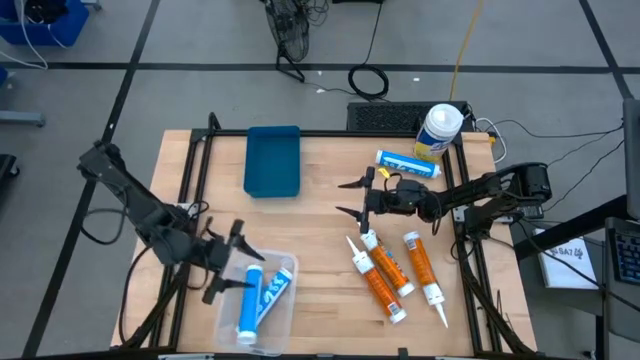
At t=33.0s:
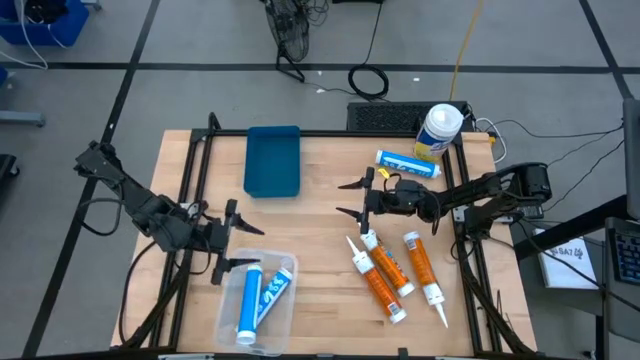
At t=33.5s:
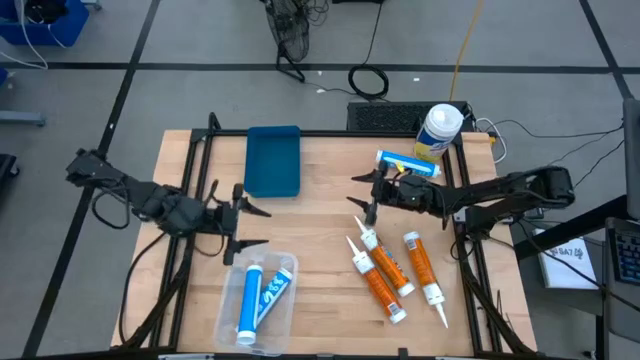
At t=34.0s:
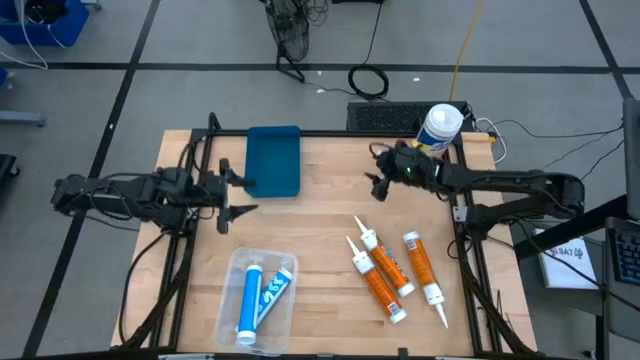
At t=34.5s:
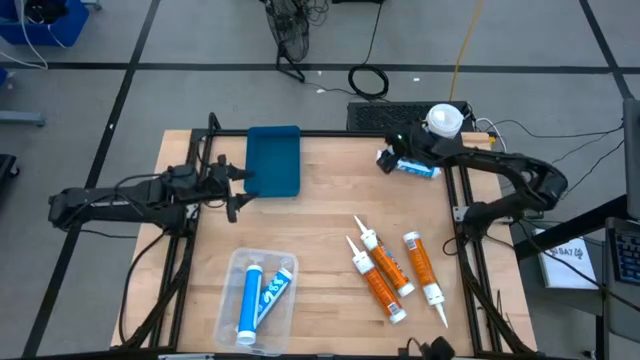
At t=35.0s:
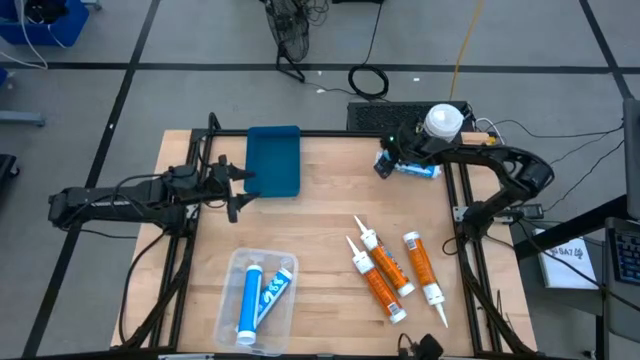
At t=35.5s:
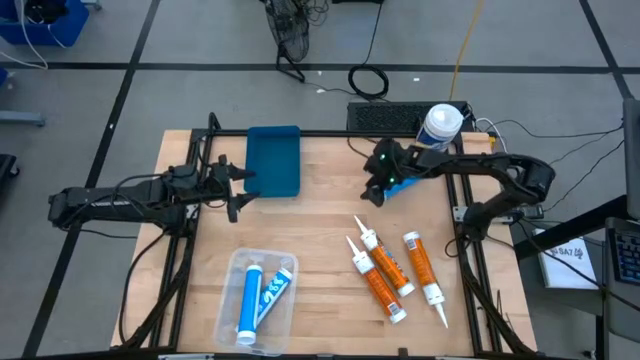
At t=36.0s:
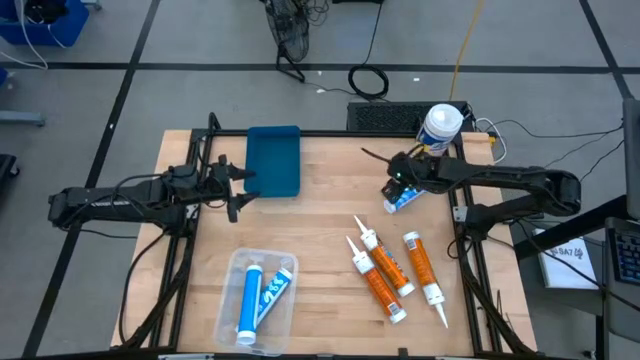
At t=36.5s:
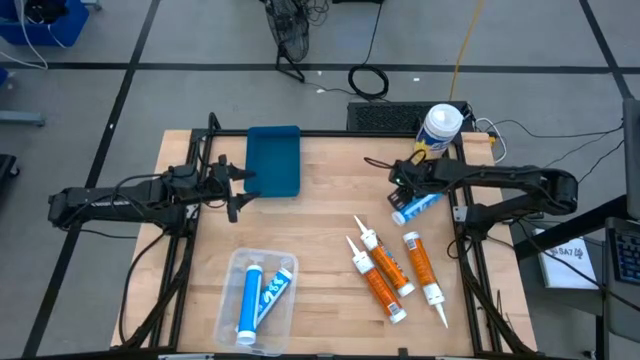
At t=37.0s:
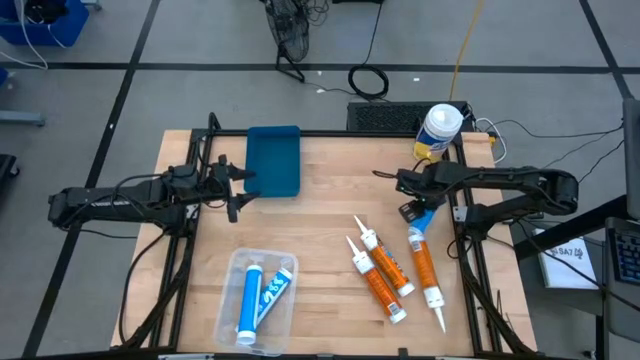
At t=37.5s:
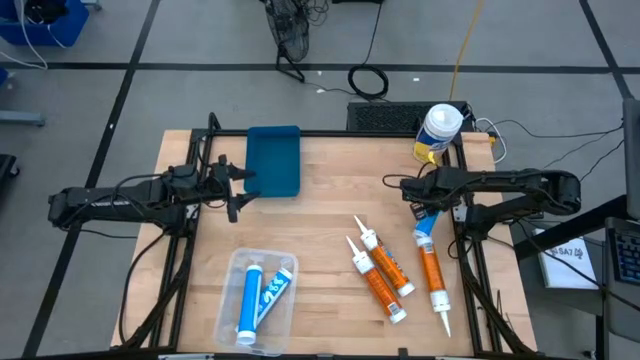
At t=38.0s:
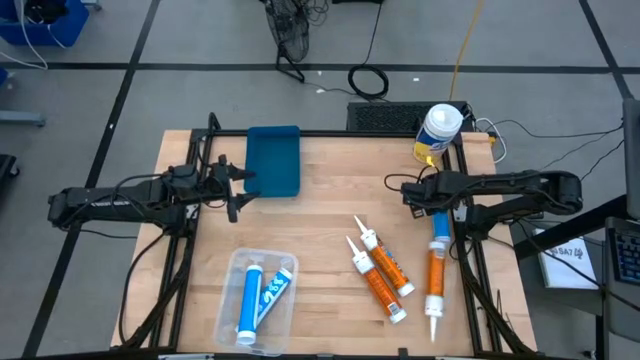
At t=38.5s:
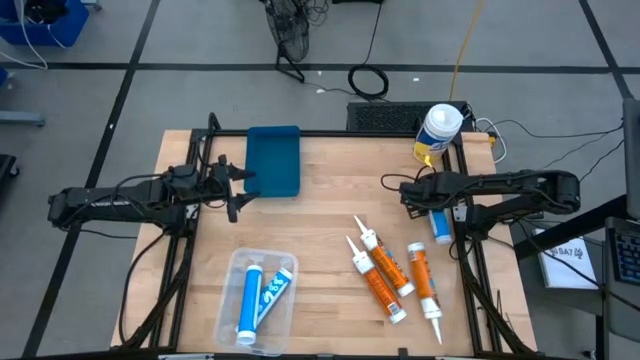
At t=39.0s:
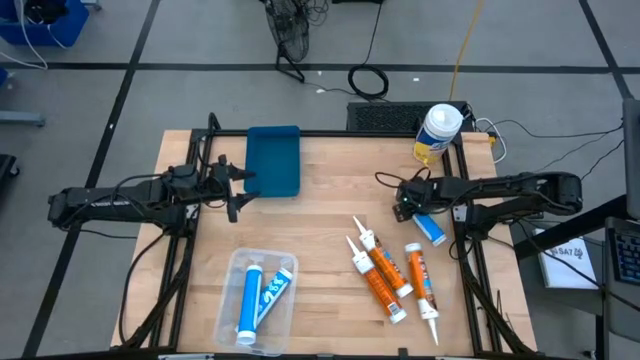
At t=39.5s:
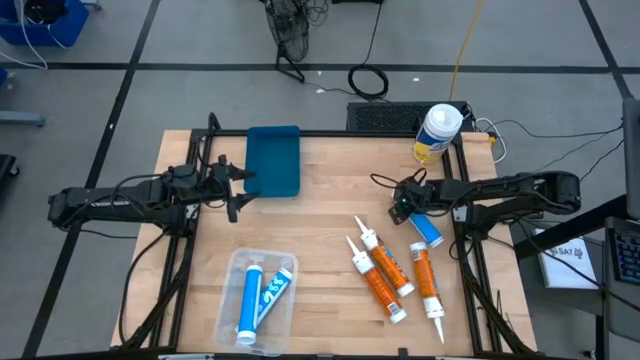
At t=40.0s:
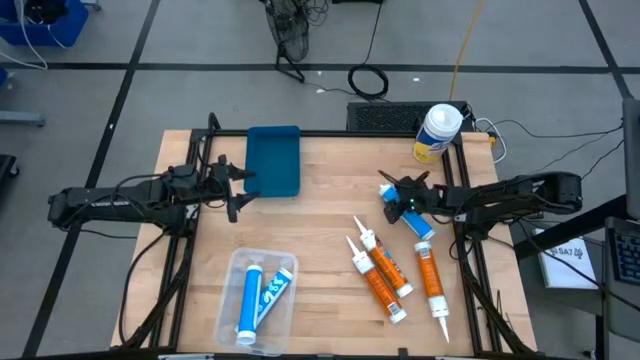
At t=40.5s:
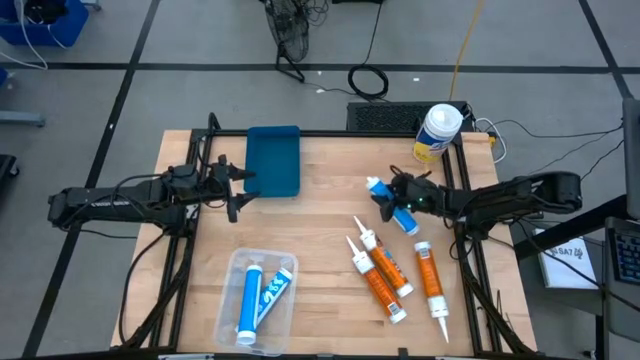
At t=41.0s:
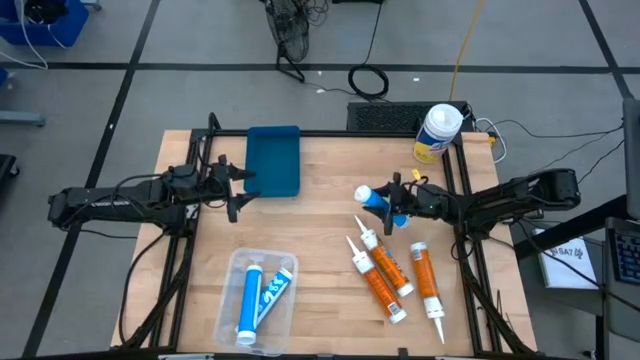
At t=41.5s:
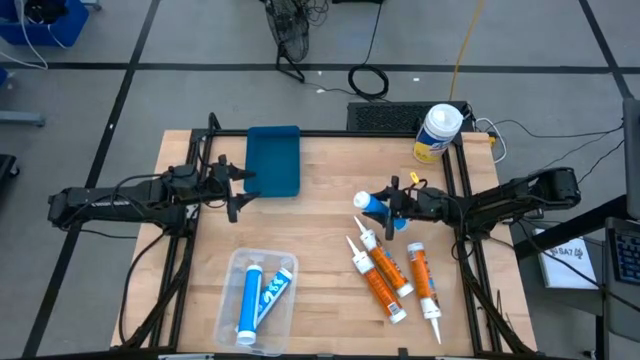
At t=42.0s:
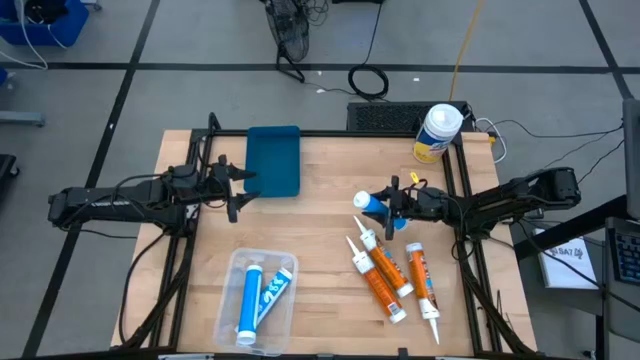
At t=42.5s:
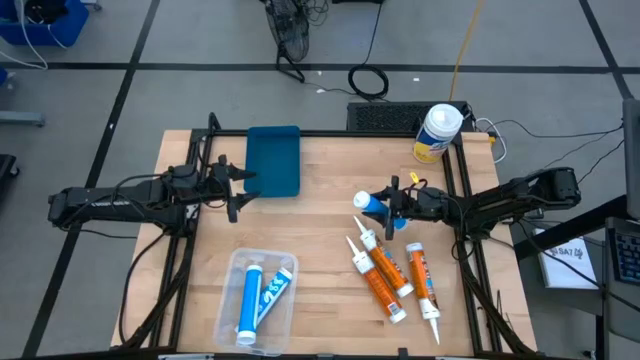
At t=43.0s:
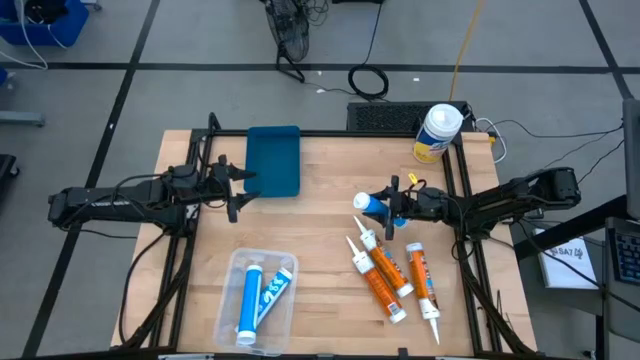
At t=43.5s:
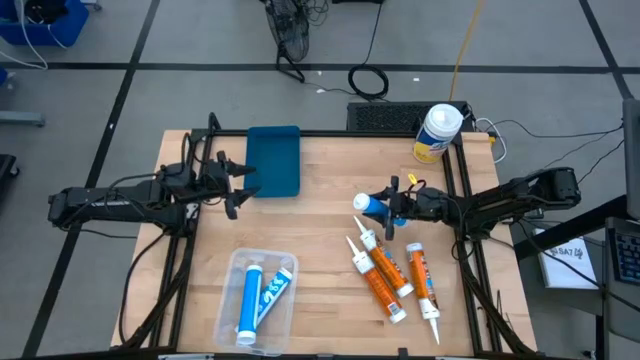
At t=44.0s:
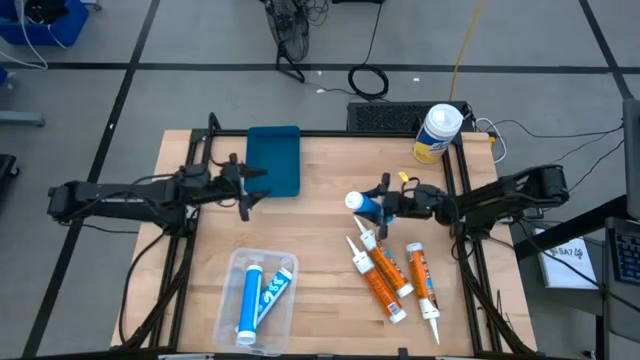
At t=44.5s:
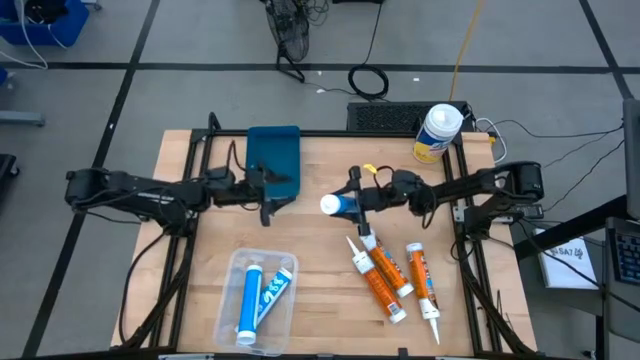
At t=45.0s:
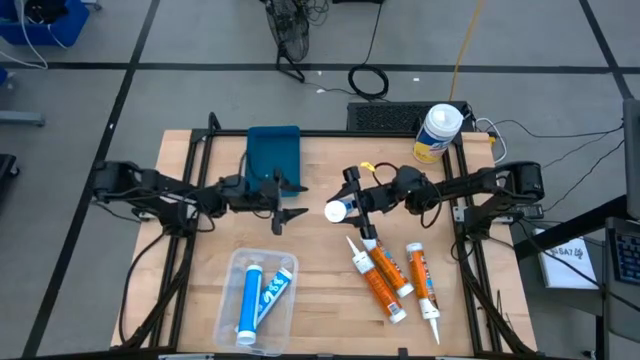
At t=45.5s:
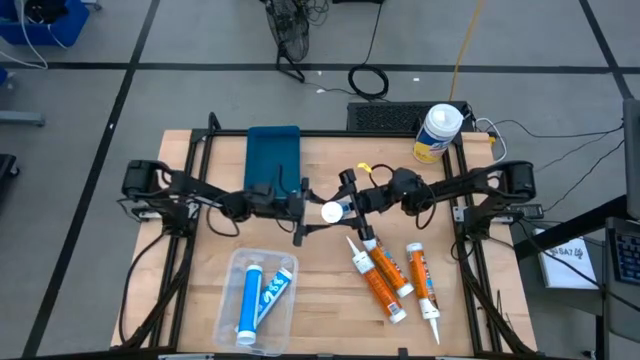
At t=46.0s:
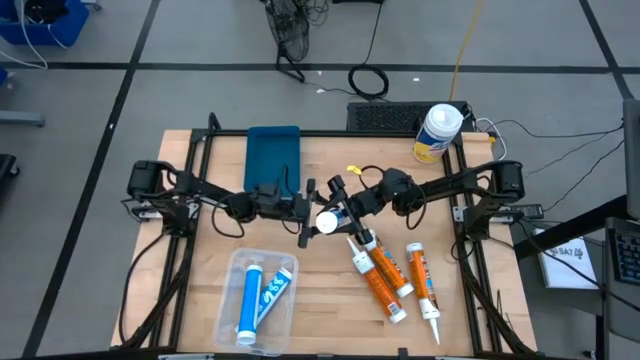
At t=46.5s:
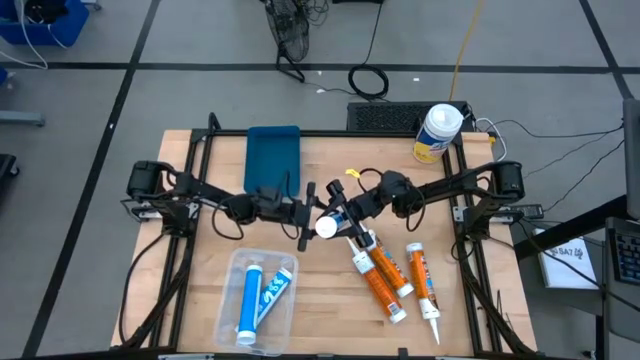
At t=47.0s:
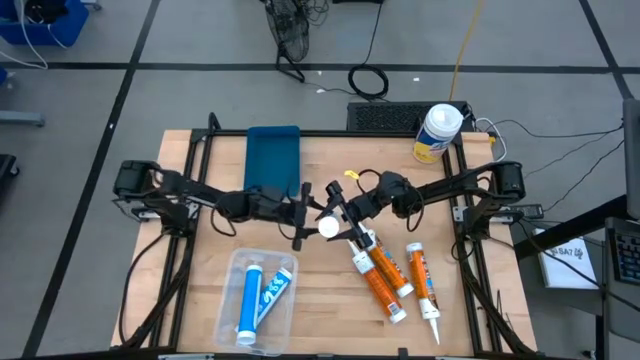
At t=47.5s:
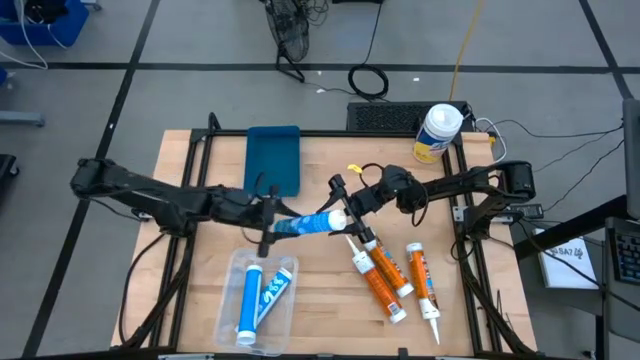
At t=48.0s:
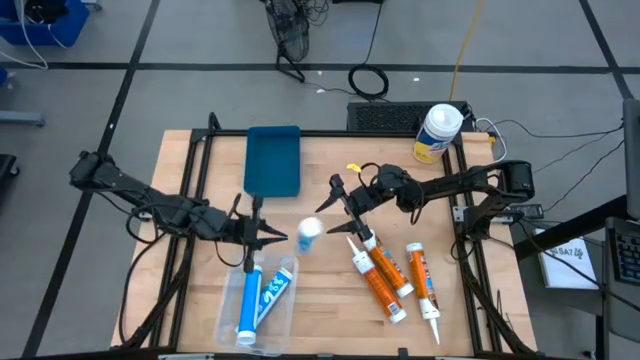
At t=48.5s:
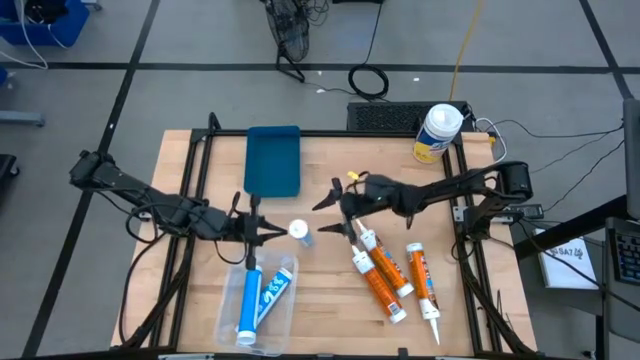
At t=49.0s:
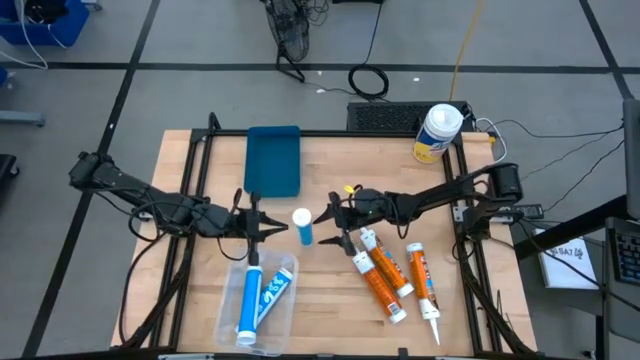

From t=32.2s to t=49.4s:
Task: Pick & place silicon tubes, Sealant and Lysol wipes
Put the blue sealant into the transparent bin

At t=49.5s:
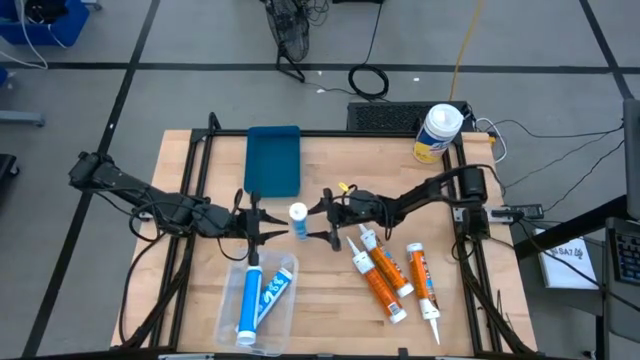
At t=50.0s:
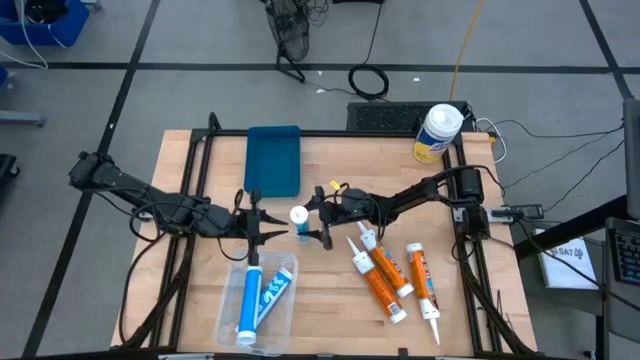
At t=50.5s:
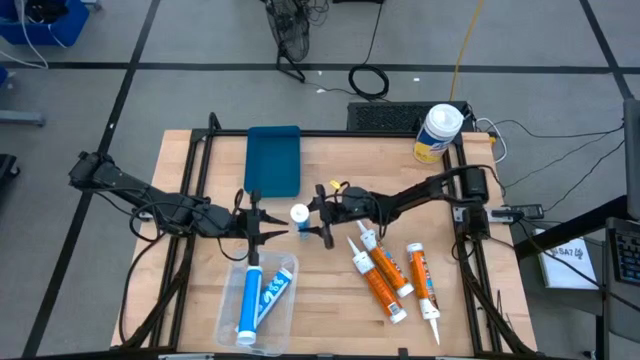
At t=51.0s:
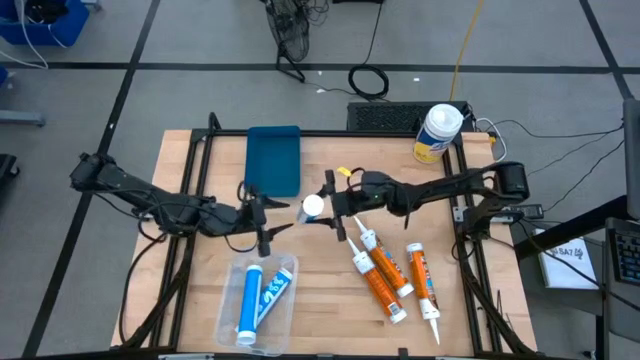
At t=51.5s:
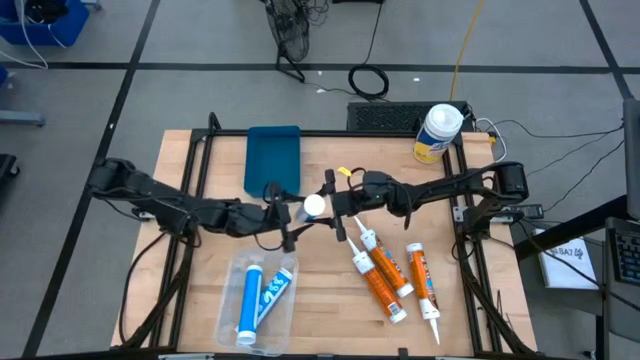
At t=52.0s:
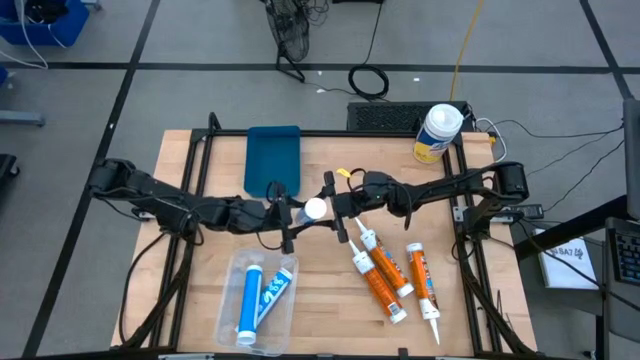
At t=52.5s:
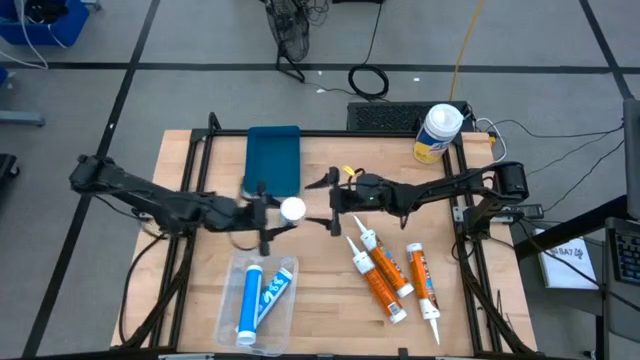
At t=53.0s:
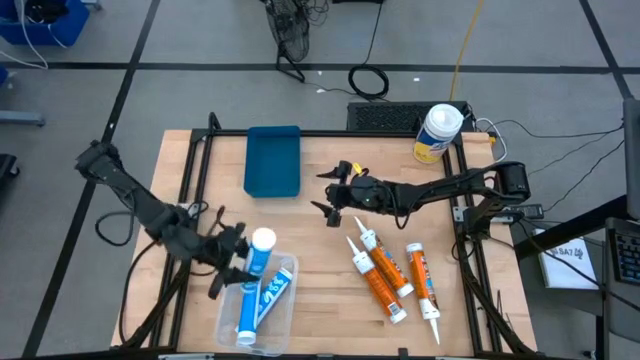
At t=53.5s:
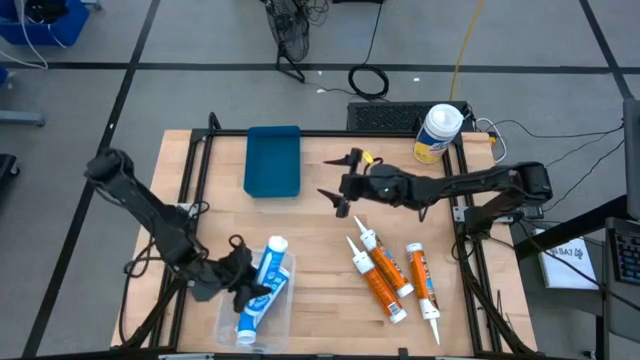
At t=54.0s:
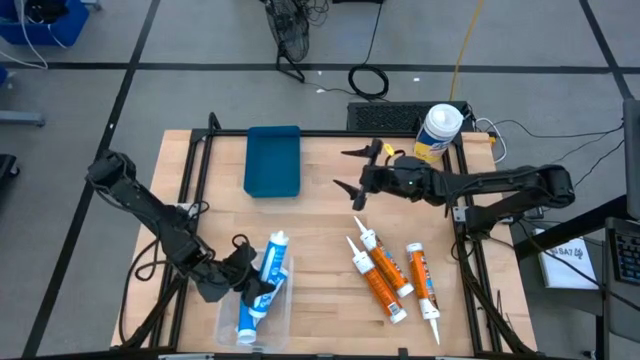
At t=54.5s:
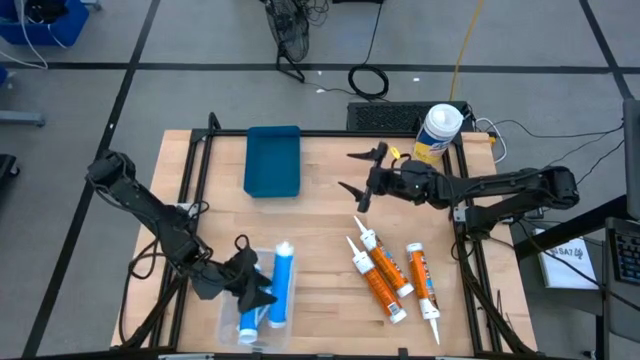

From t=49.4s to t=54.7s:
Put the blue sealant into the transparent bin
